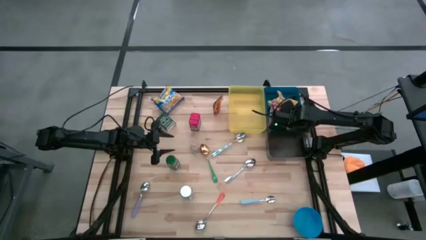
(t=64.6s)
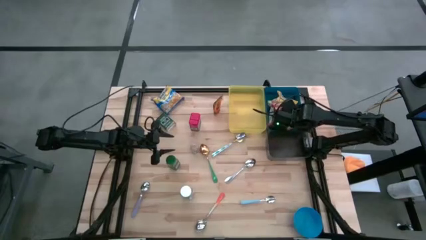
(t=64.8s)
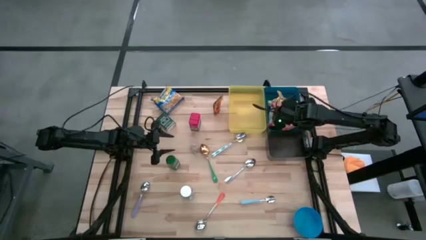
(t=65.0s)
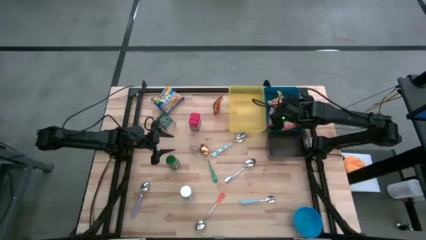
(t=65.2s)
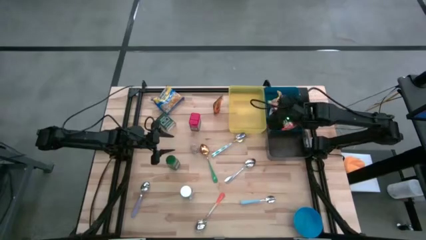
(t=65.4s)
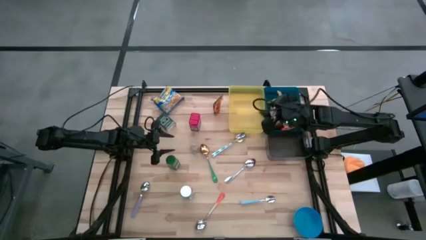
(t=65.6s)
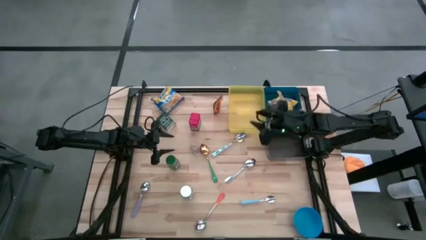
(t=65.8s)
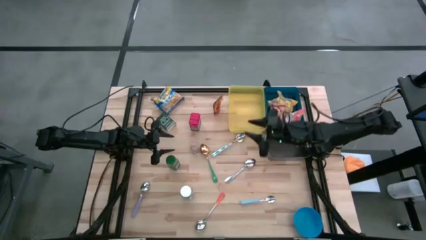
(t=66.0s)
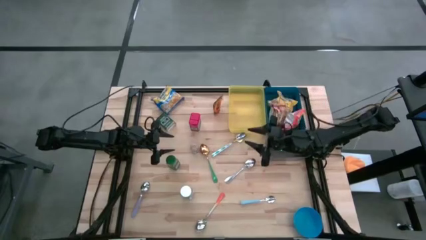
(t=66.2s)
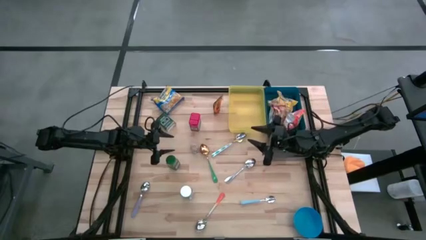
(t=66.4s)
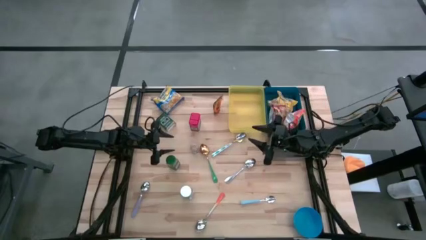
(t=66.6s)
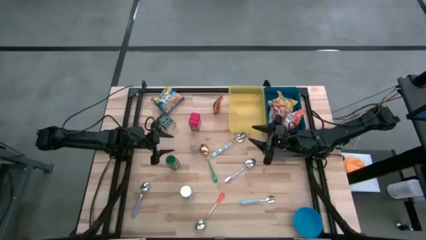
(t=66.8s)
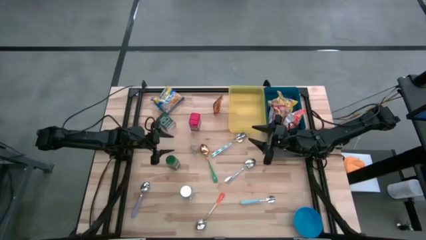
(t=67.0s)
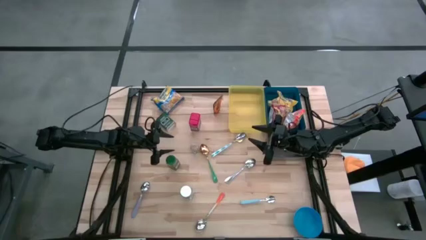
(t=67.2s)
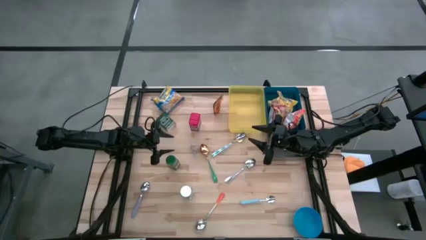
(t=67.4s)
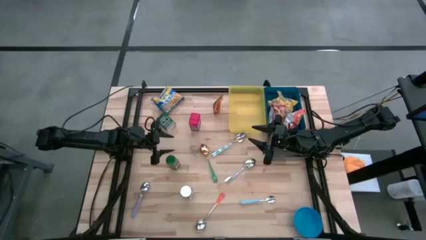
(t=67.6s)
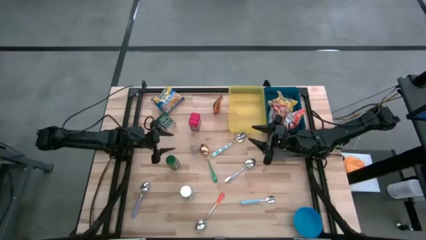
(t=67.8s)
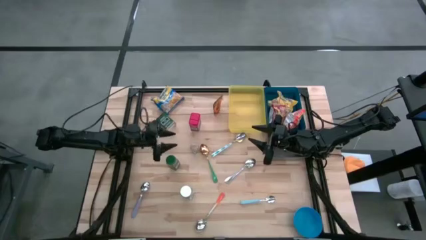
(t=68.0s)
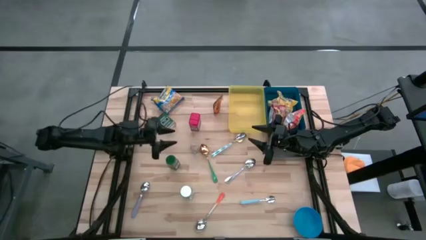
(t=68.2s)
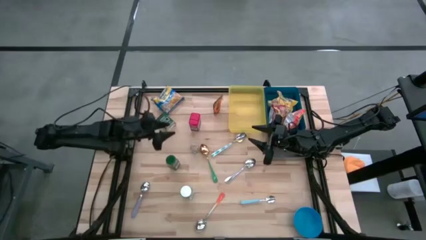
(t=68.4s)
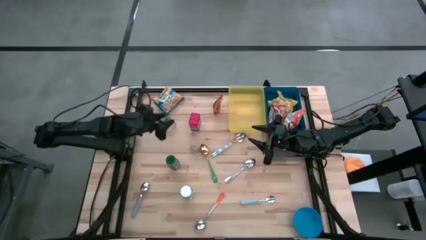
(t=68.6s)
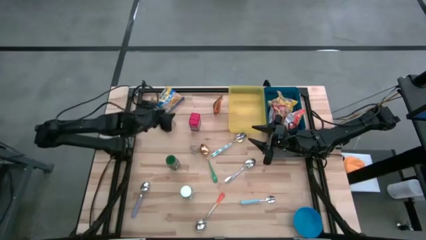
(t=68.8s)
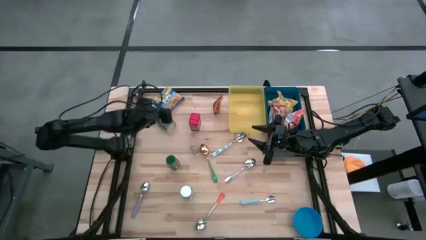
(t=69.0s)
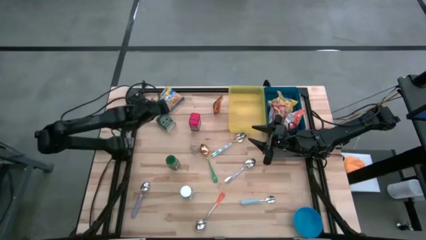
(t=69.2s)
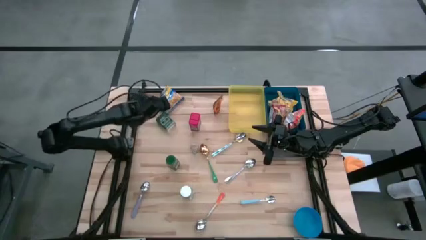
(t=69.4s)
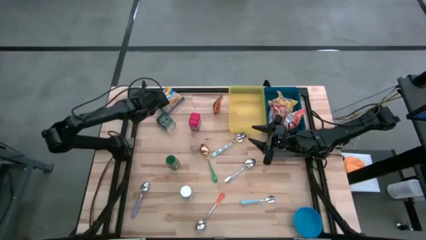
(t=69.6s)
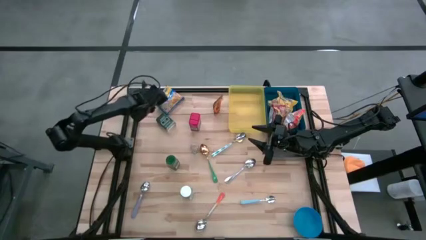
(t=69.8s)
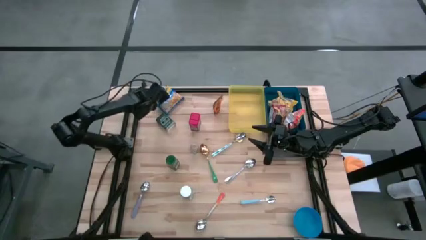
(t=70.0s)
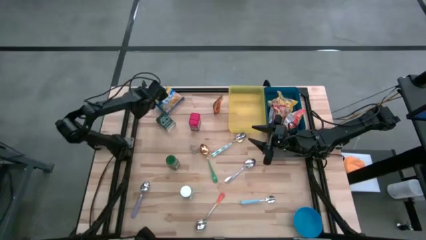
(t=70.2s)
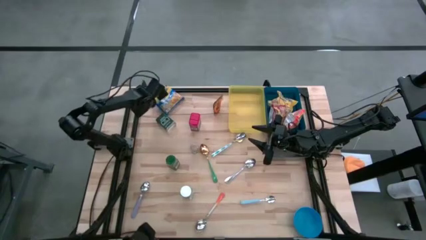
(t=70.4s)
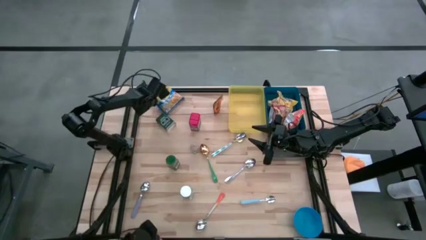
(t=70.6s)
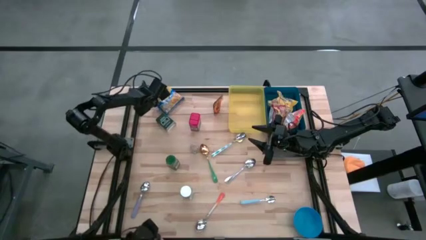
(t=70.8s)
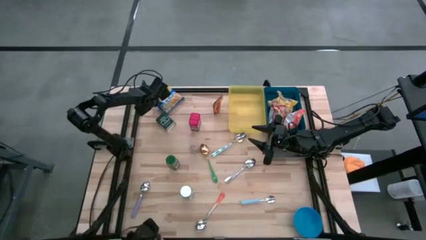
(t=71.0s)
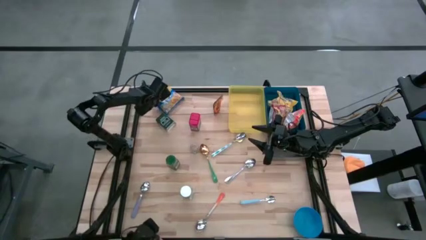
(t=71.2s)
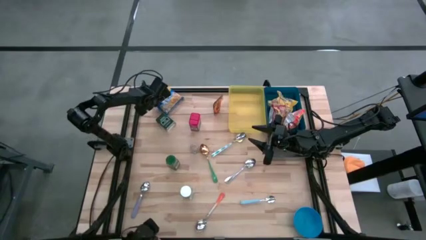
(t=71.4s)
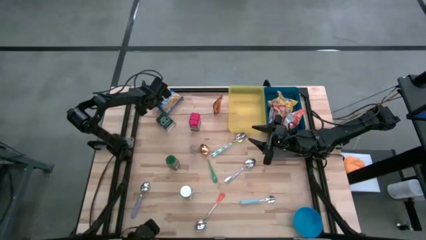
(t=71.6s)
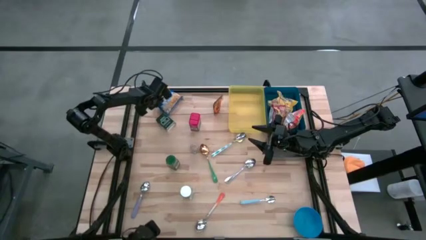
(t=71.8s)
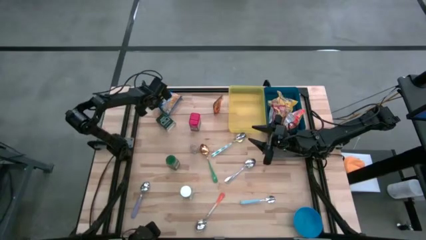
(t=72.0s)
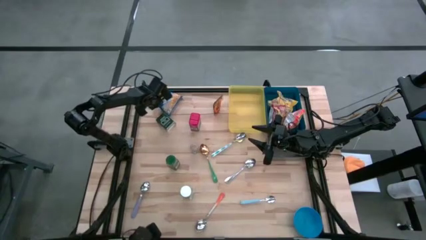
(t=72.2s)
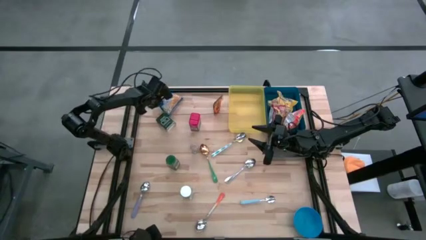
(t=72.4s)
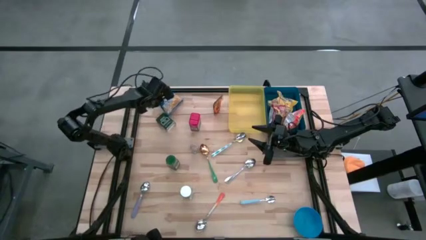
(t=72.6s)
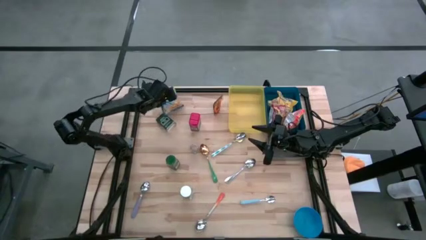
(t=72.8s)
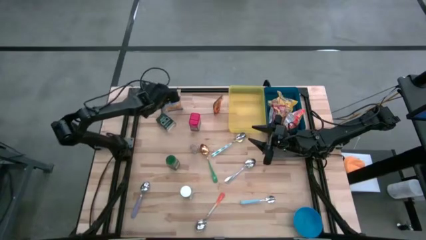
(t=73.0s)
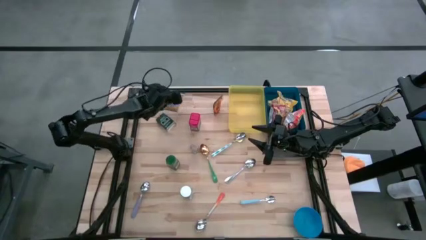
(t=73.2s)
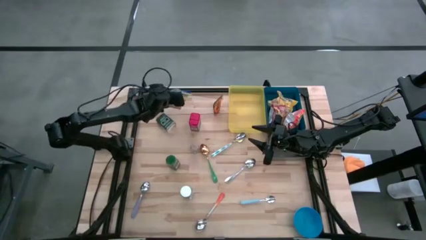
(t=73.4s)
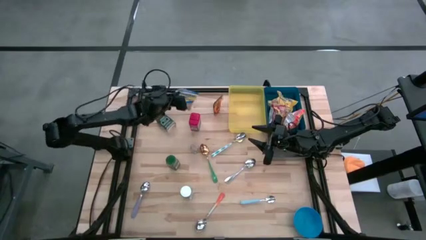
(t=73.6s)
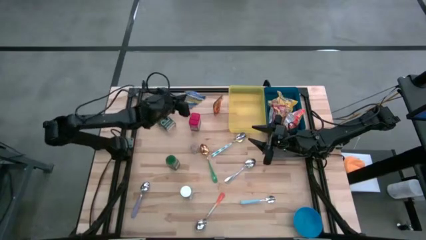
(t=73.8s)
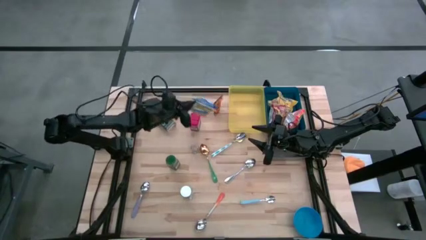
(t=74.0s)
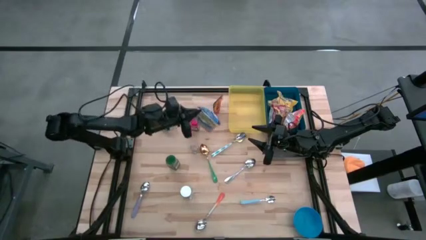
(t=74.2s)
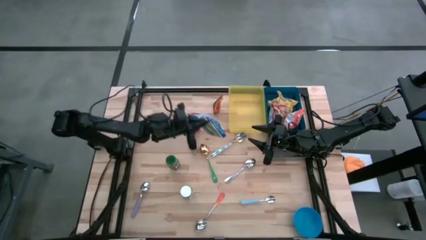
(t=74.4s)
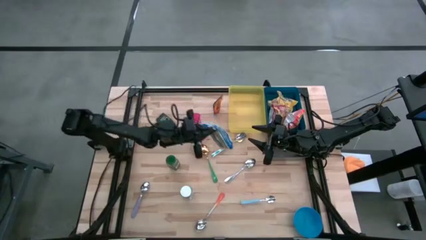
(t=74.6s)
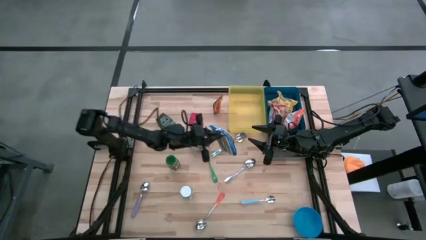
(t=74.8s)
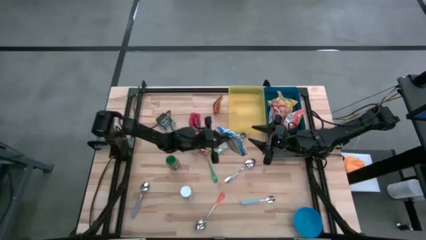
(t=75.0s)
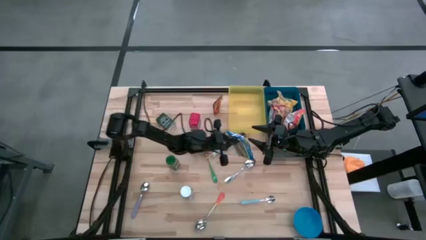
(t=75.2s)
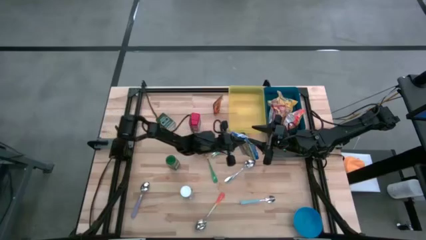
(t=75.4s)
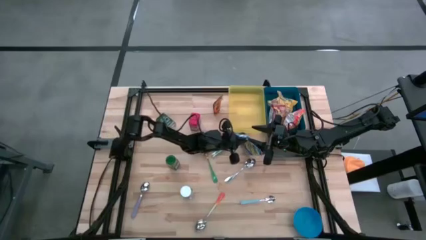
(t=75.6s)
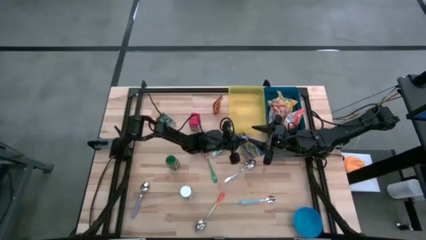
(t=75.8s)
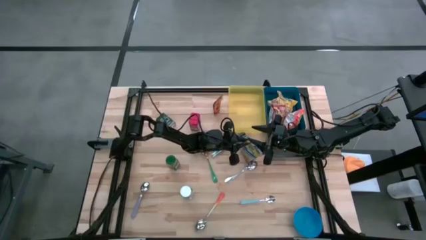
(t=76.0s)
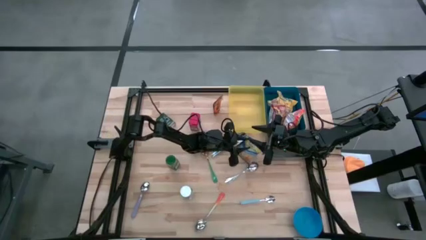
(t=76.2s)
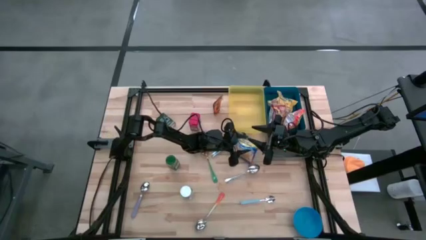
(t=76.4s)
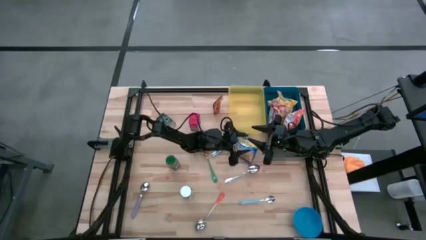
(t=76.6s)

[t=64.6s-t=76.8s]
Put the blue noodle pack into the blue bin
